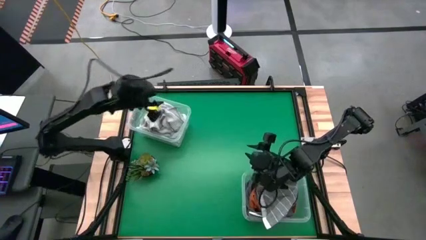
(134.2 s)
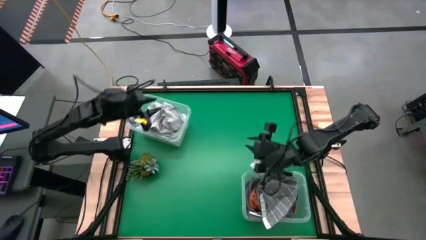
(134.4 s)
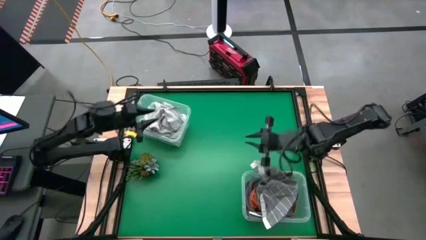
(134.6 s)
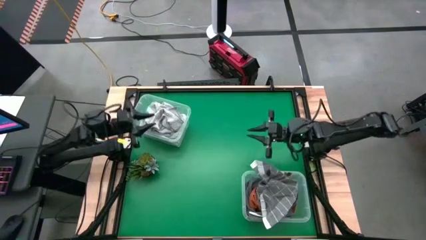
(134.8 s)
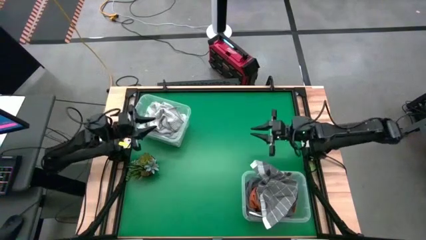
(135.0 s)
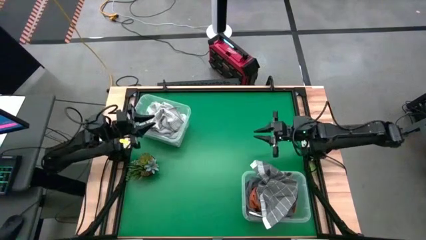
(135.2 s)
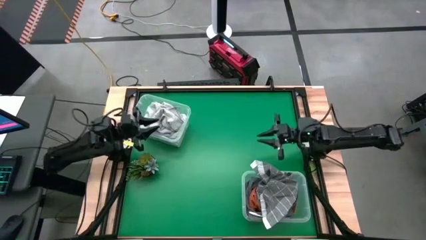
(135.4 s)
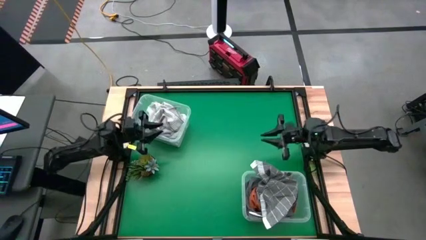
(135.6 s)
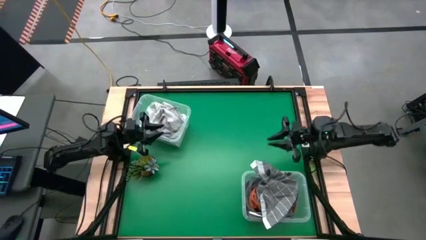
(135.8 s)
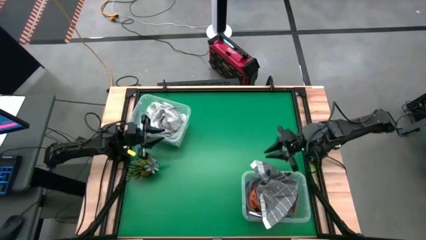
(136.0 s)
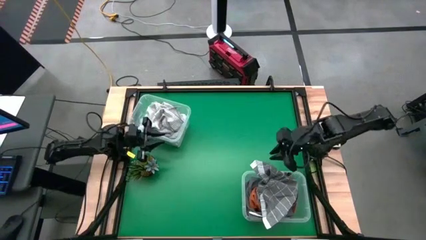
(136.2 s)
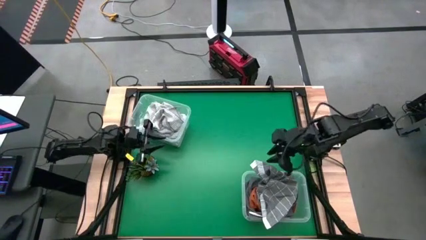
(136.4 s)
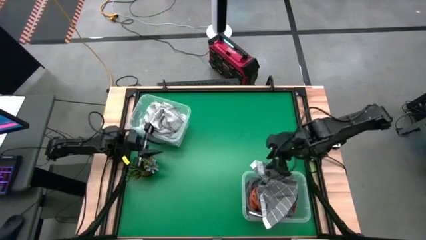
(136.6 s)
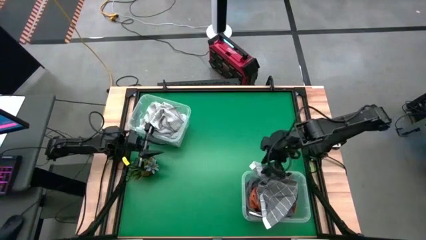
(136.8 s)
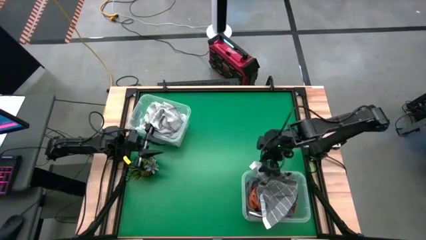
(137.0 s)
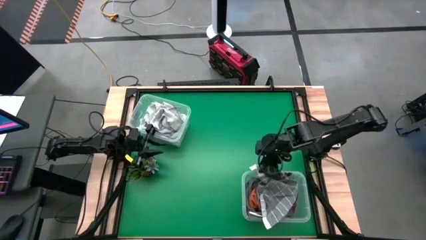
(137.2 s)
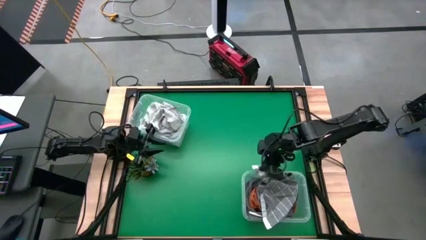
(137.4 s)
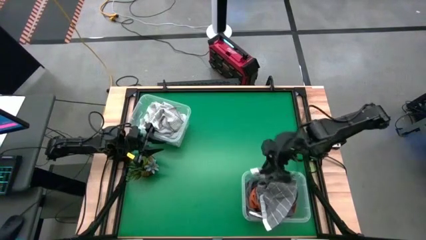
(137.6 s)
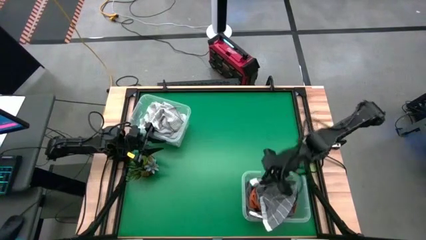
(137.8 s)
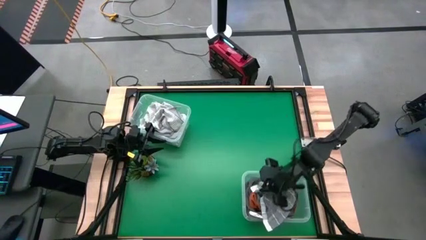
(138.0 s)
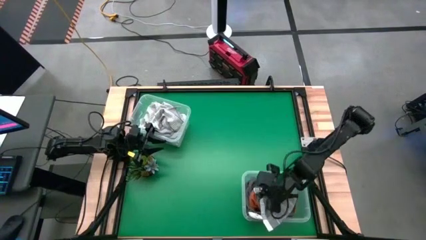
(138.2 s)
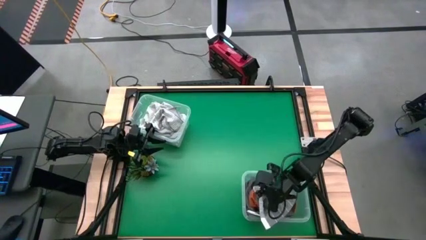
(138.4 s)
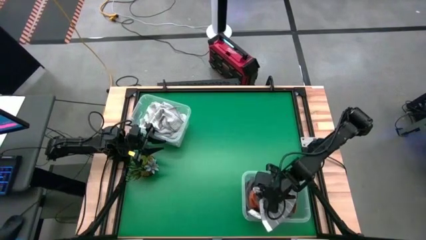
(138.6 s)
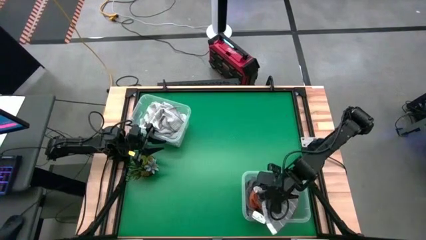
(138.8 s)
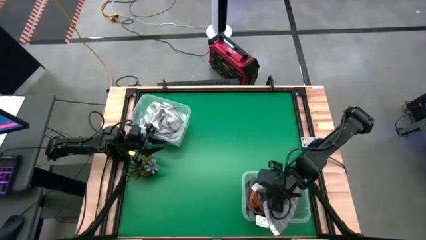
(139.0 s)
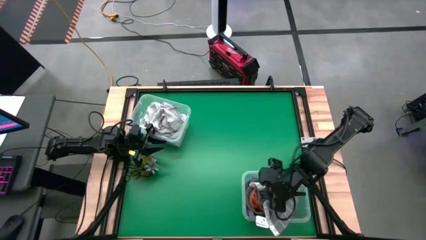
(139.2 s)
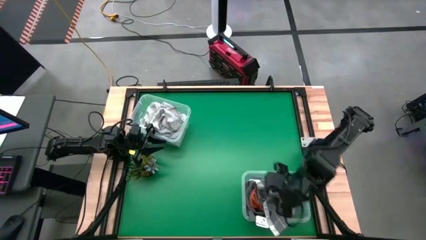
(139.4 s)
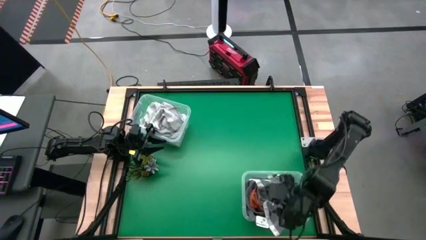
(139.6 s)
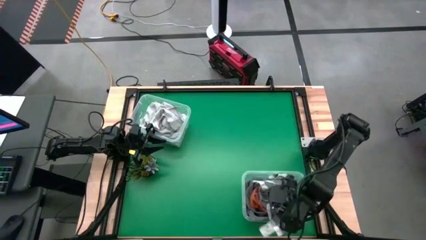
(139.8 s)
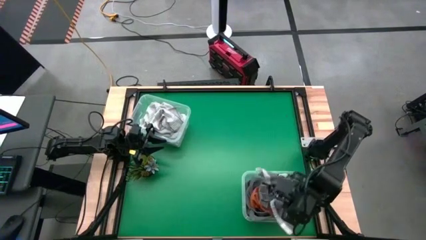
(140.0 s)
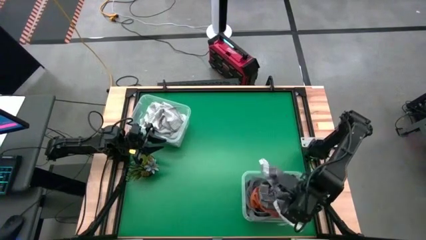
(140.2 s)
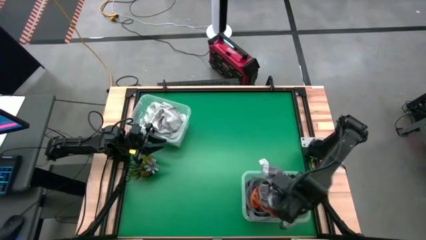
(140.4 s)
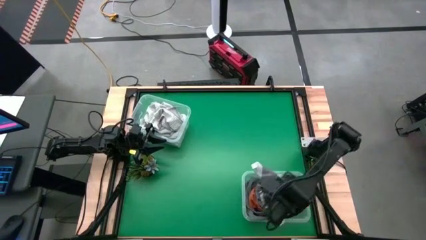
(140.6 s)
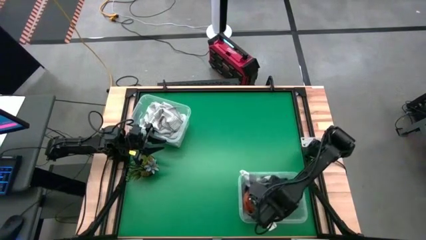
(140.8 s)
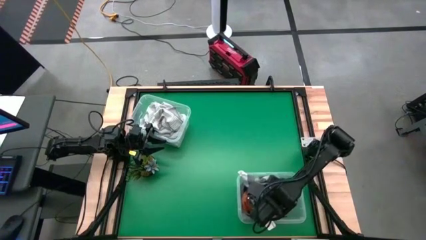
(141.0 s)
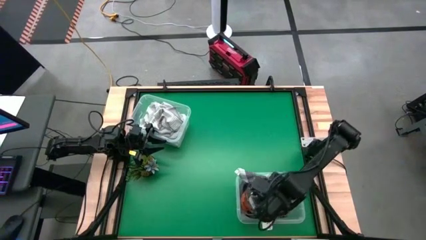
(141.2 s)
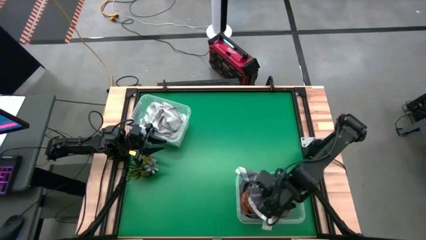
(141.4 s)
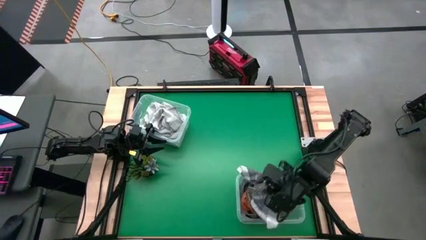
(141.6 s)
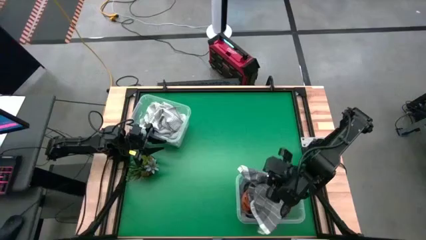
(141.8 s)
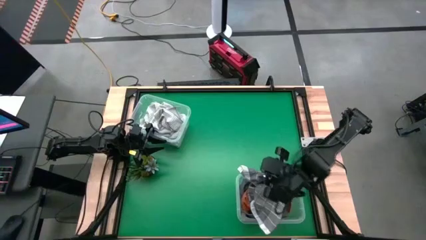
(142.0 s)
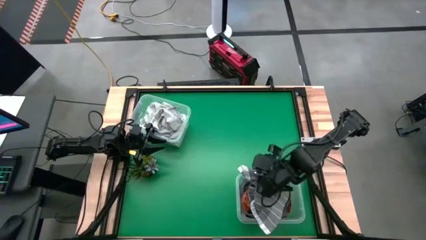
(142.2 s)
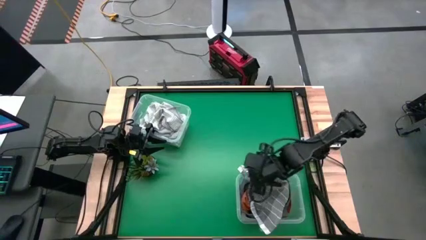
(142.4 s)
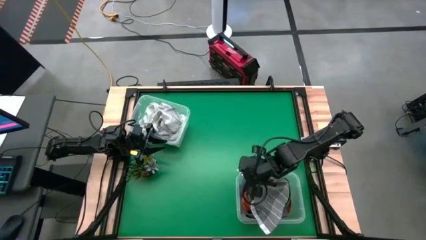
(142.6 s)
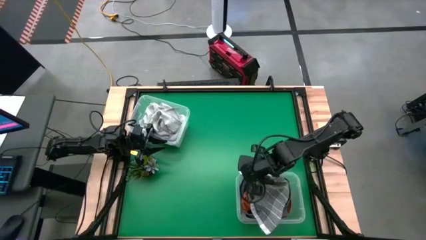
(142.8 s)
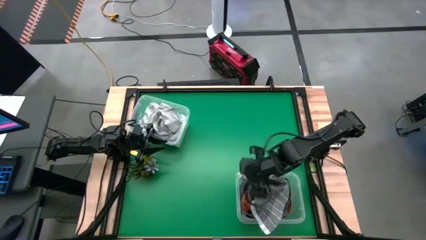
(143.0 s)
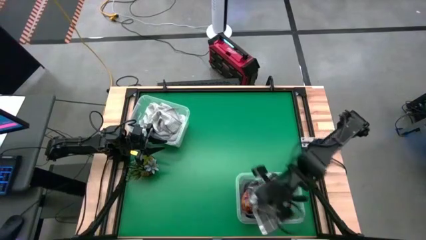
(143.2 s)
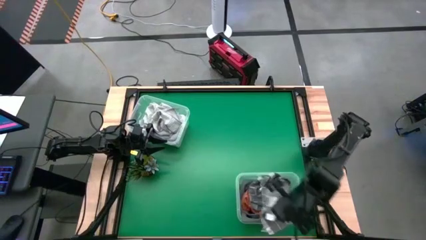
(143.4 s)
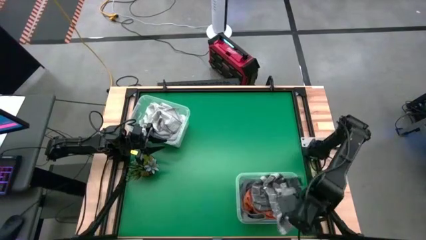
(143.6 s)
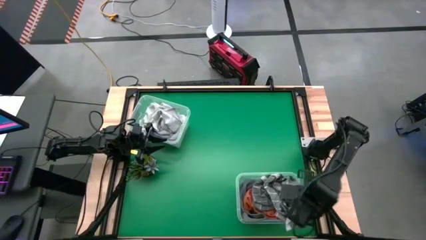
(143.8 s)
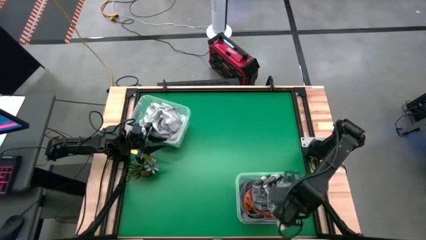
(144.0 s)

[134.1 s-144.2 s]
Task: Sort towels by color in basket
Adjust the gray checkered towel

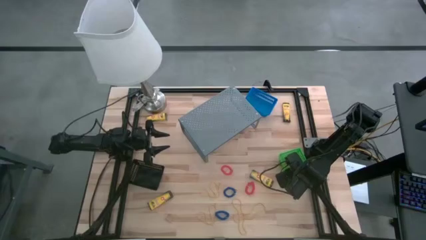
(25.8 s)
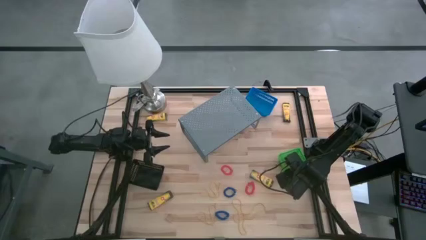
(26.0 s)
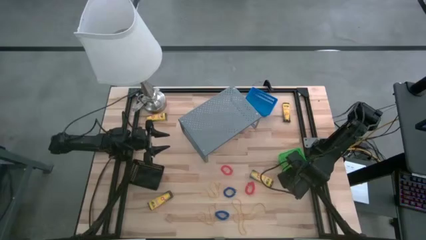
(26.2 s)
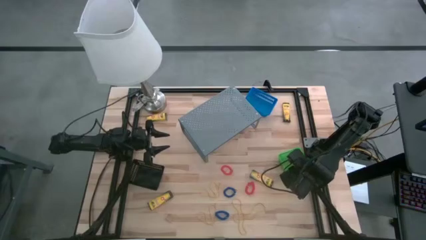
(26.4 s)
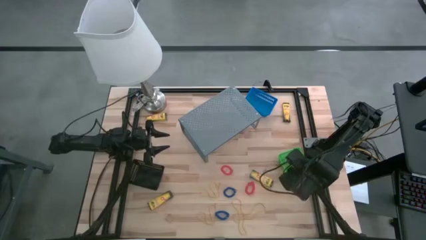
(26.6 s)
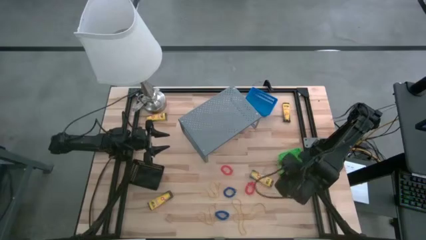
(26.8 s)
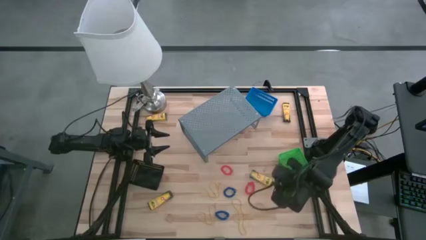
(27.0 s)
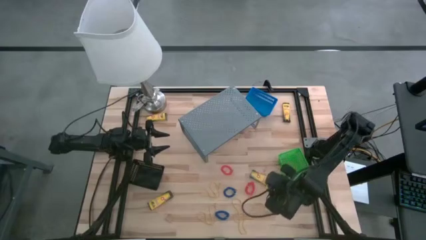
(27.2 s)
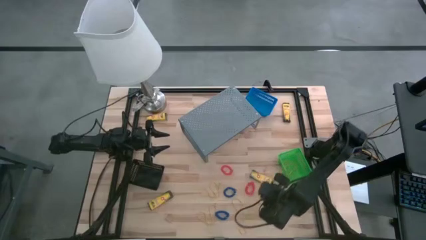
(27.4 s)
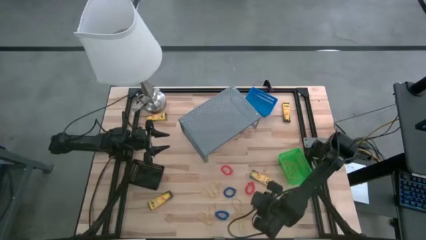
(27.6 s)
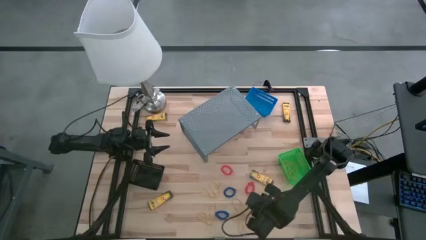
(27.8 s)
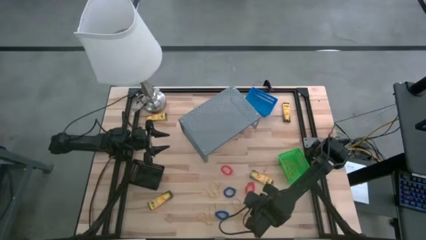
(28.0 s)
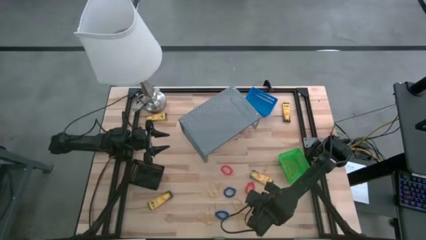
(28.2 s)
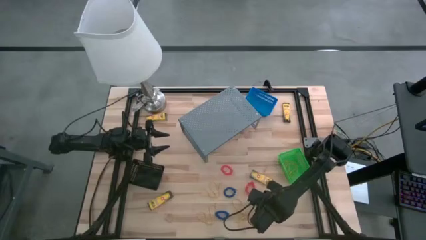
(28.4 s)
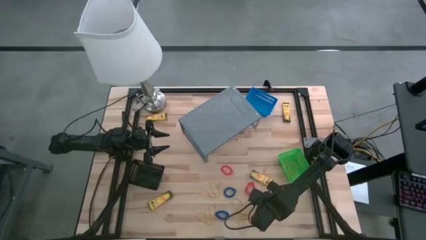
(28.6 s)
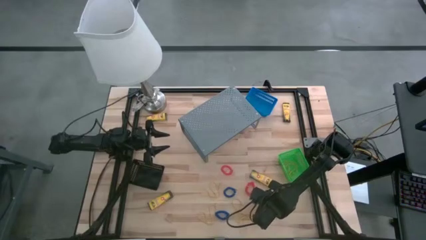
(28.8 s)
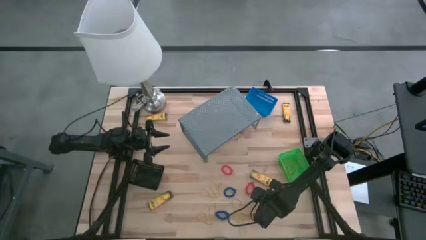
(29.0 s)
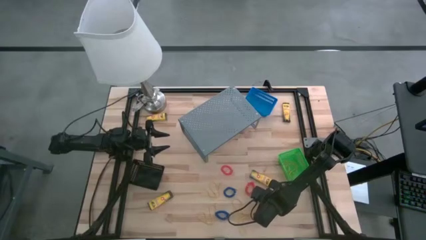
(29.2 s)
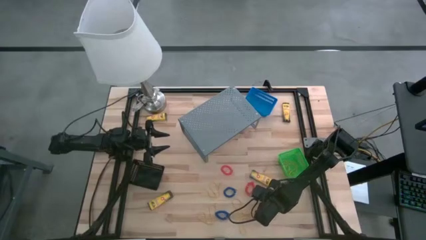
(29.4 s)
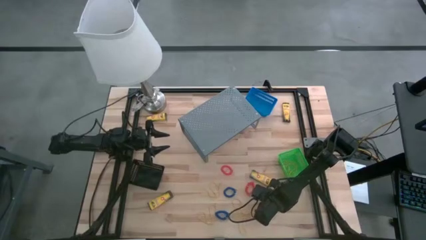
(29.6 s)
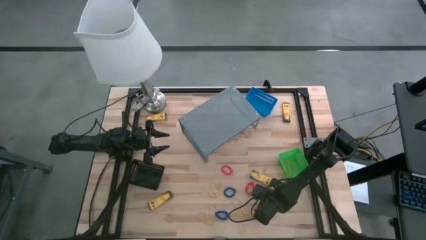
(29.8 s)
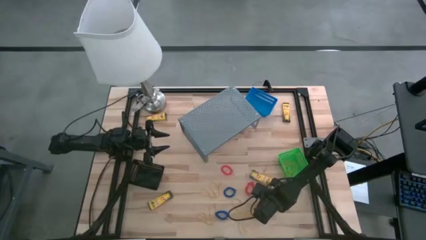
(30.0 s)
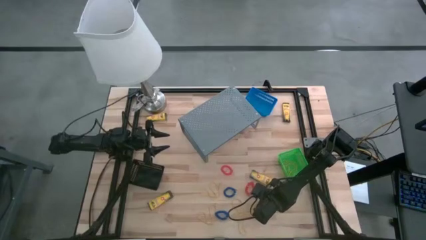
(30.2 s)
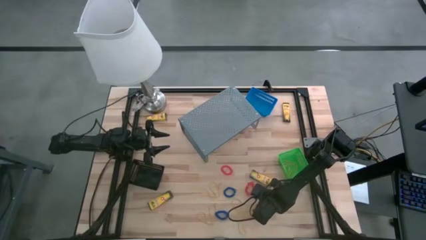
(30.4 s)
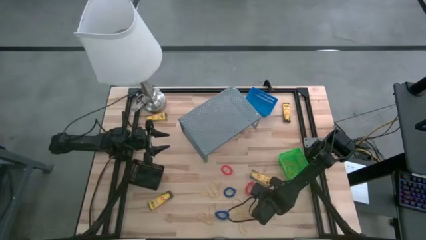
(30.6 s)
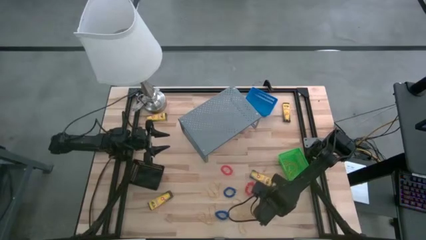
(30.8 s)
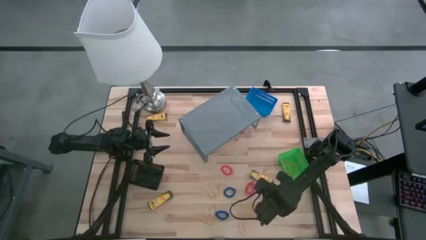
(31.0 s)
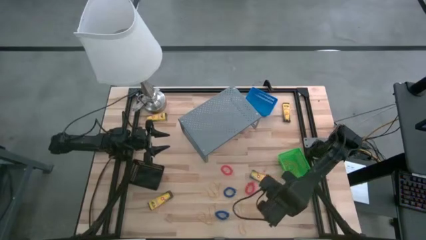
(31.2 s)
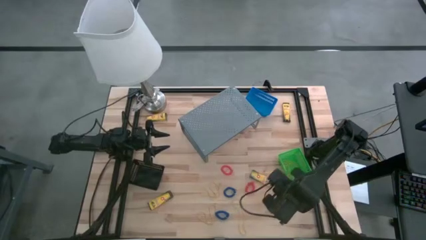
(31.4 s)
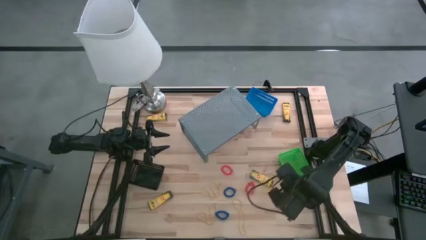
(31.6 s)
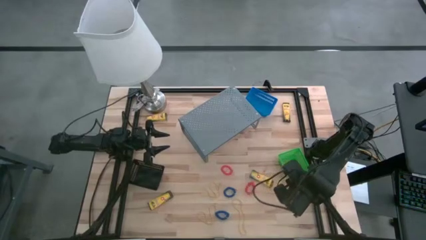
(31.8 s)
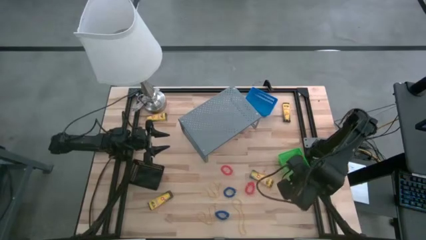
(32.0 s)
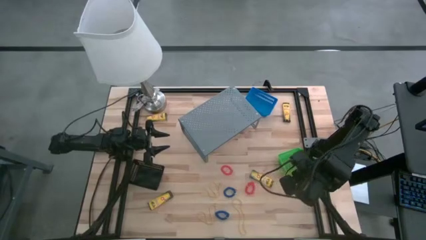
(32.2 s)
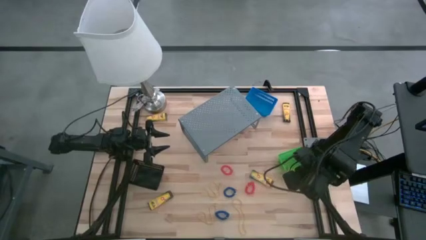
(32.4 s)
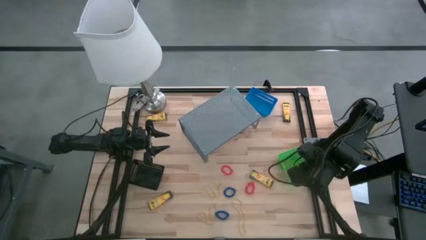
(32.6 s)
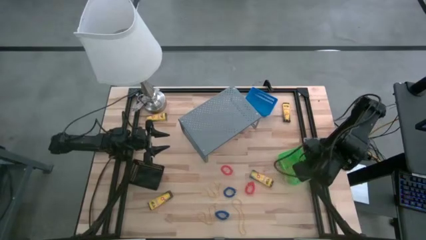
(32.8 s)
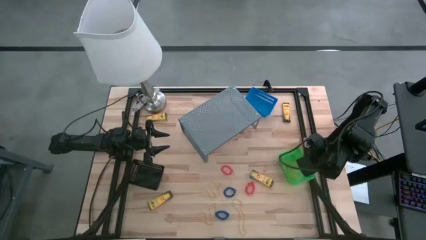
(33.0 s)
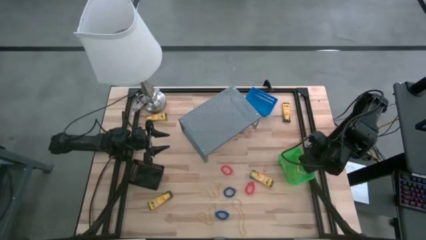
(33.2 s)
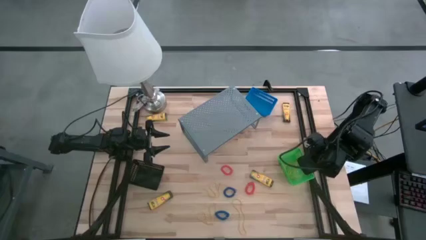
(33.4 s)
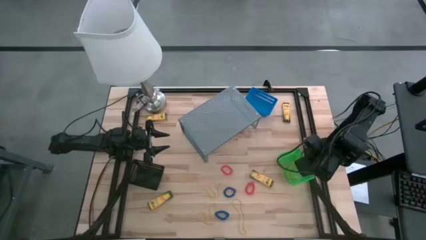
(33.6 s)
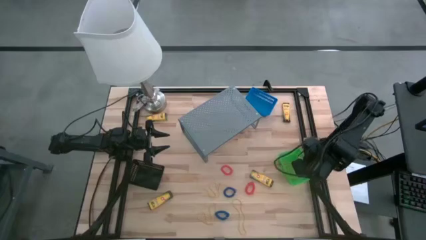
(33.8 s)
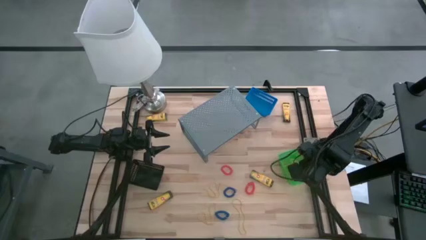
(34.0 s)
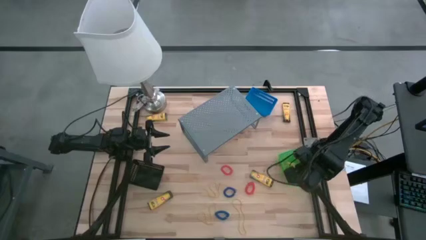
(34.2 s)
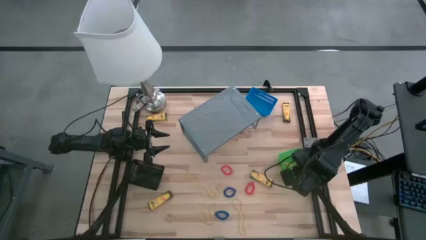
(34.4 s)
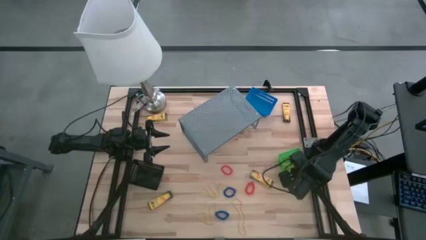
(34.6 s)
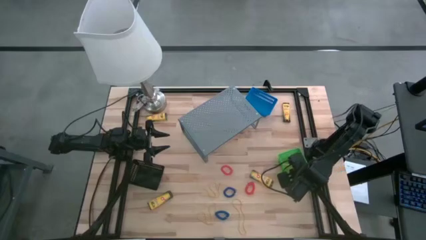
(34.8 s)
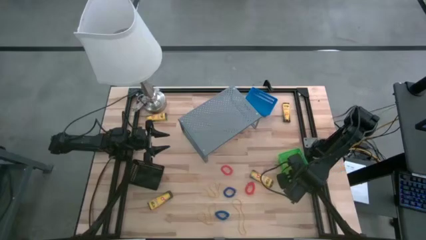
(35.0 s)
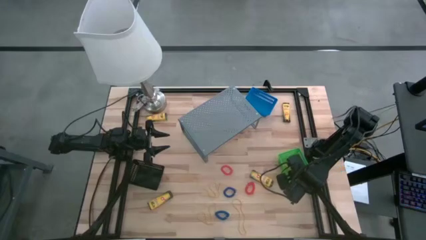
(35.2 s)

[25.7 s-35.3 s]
Task: Pick & Place Office Desk Supplies
Put the yellow rubber band into the green basket
